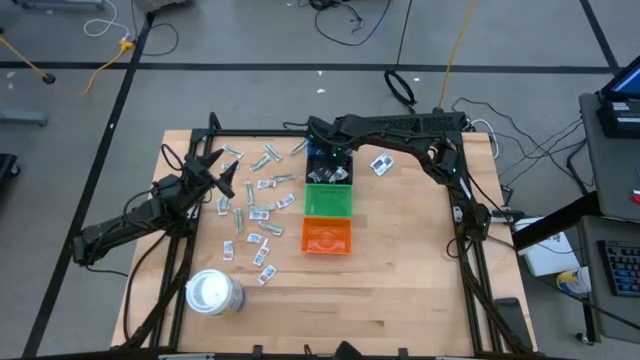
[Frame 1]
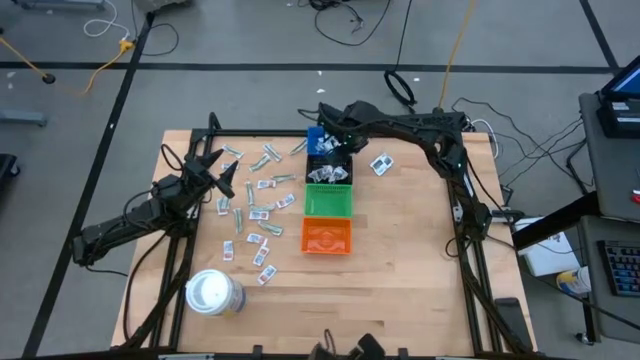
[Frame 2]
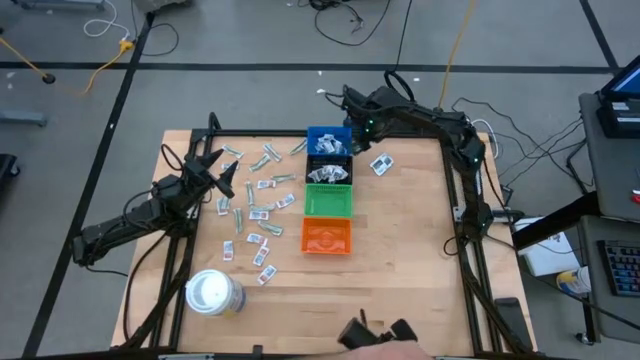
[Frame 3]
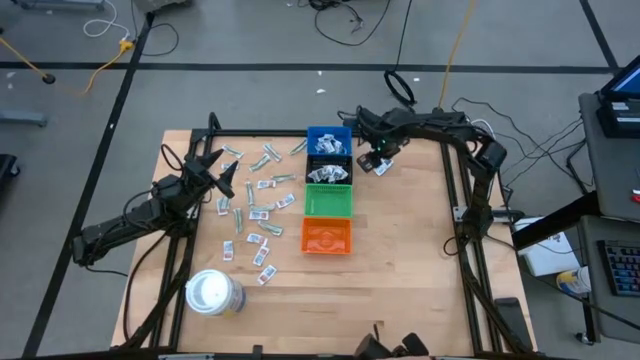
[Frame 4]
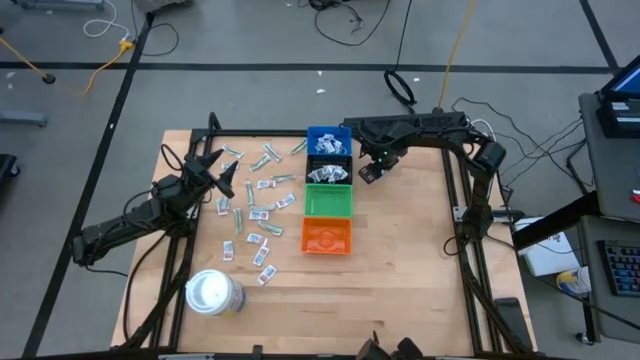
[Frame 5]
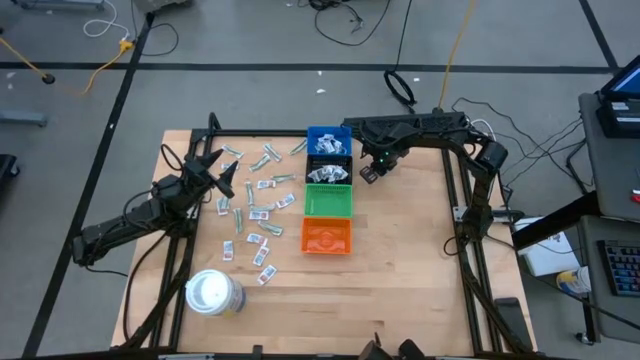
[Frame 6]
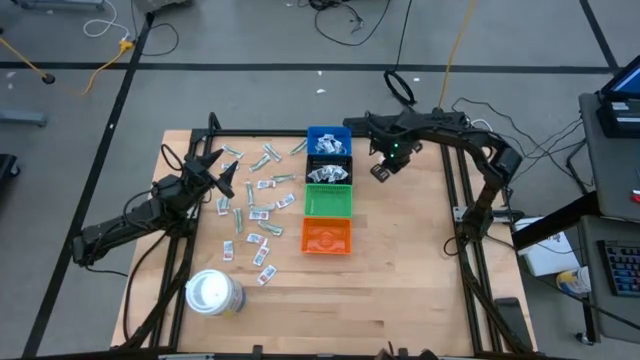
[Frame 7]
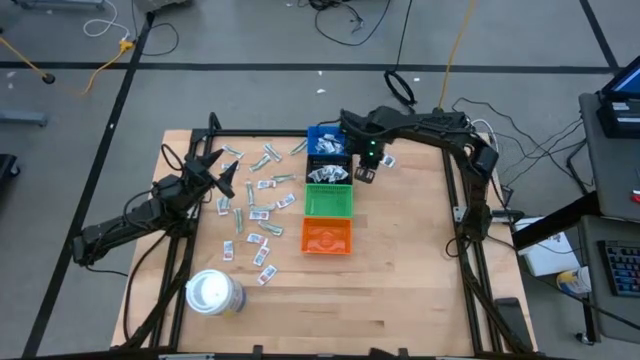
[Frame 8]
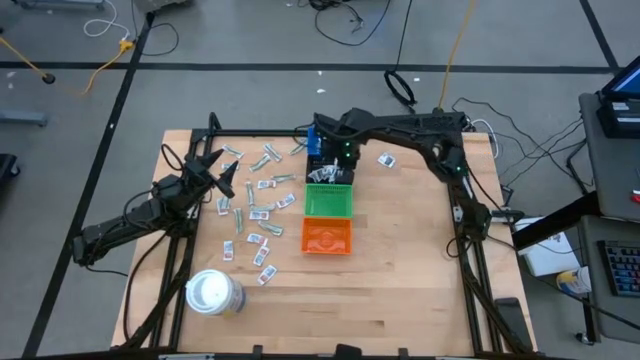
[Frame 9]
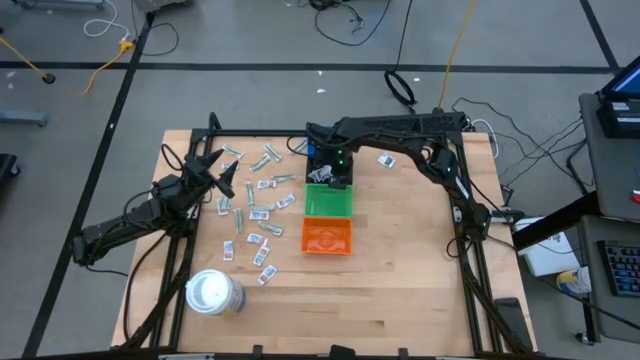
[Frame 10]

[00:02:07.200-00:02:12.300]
Task: Pick & Place First Aid Supplies
Put the black towelette pack into the black bin

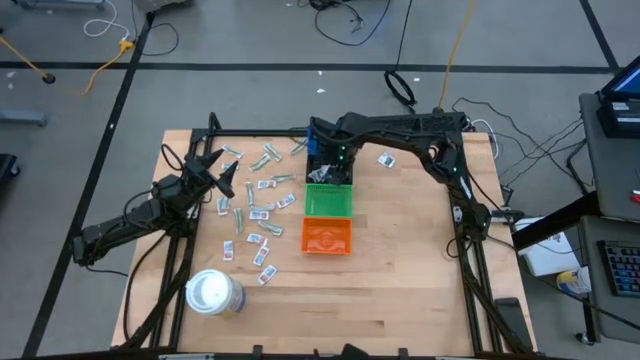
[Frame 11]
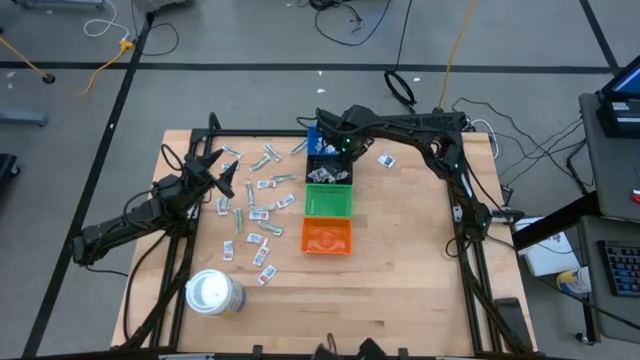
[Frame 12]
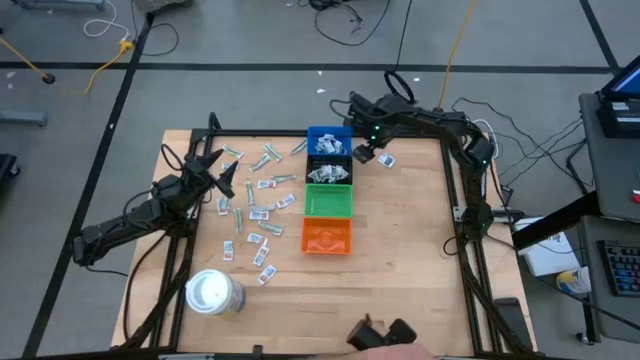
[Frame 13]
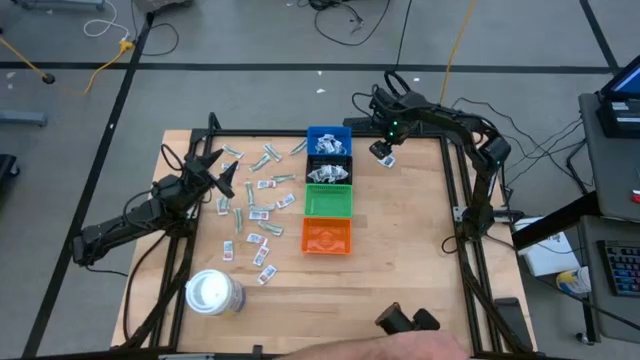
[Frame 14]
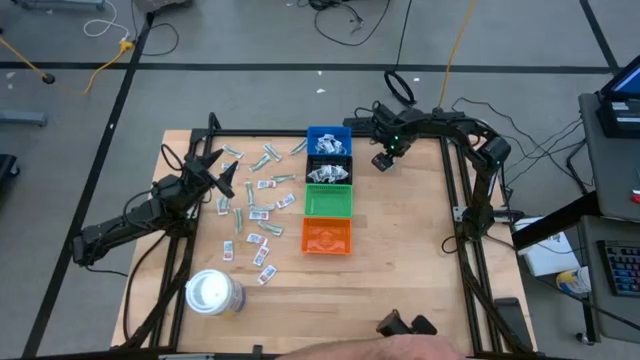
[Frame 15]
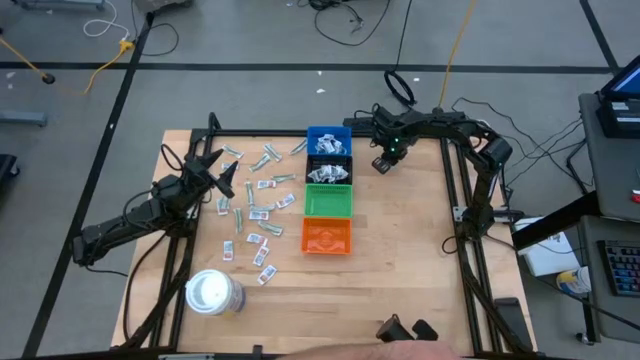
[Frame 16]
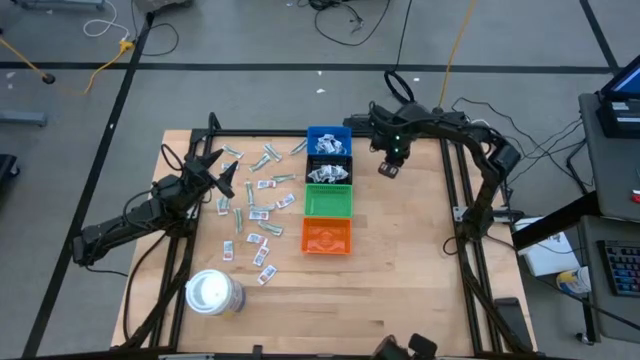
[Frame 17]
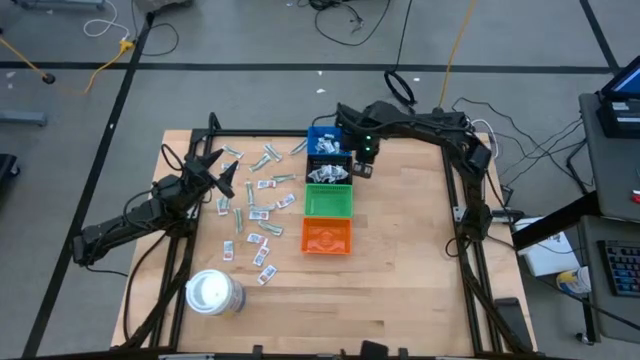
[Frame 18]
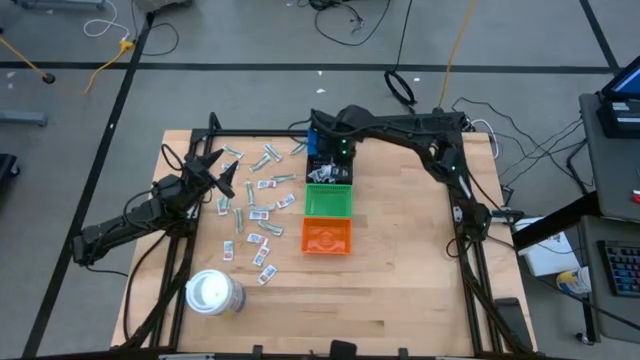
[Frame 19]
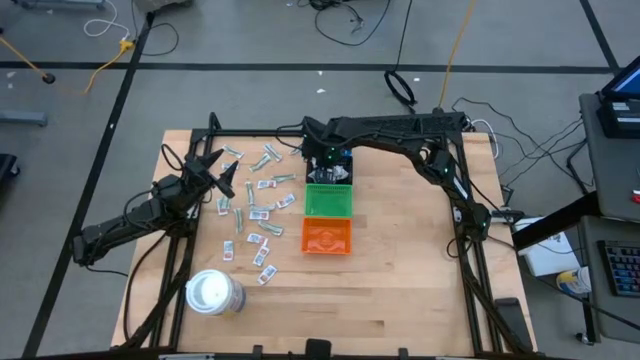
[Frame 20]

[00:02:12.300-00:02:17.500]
Put the black towelette pack into the black bin

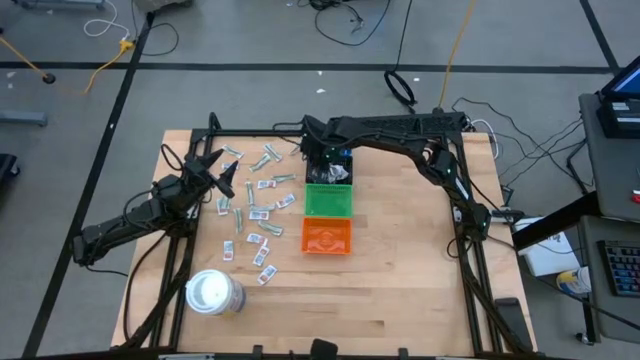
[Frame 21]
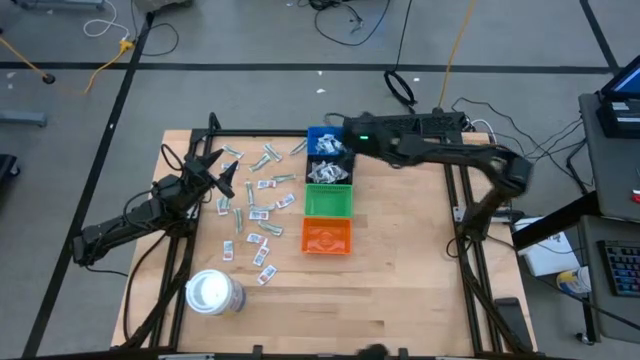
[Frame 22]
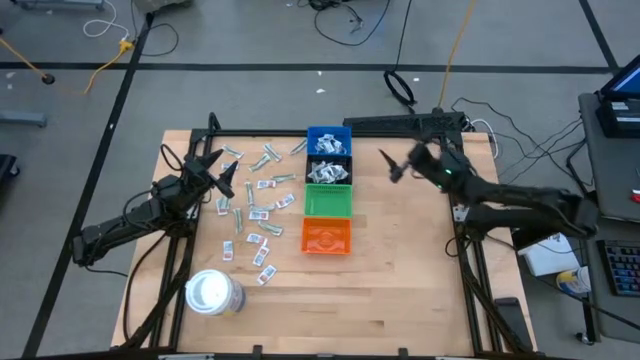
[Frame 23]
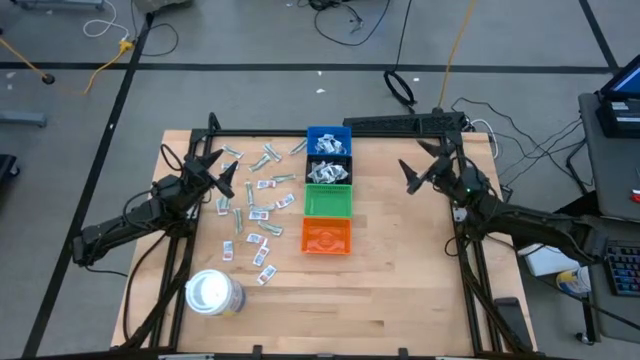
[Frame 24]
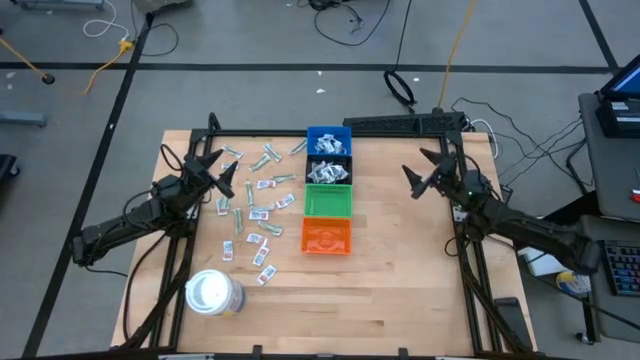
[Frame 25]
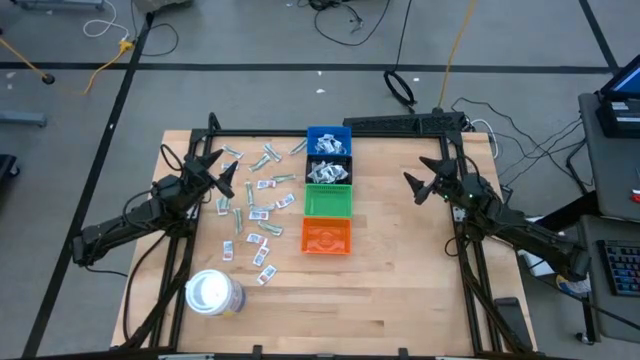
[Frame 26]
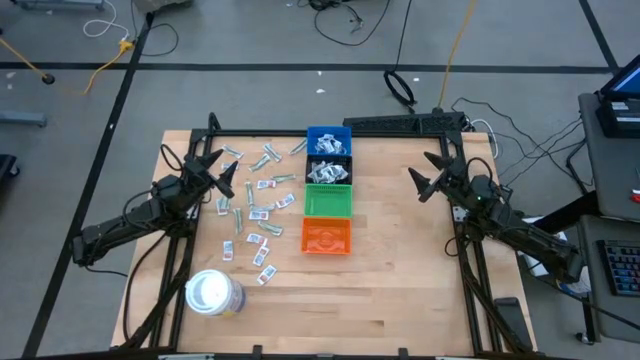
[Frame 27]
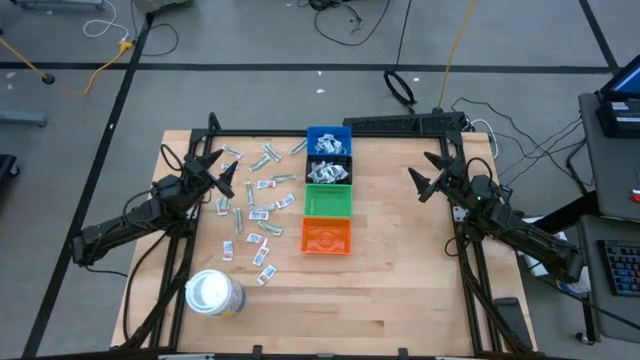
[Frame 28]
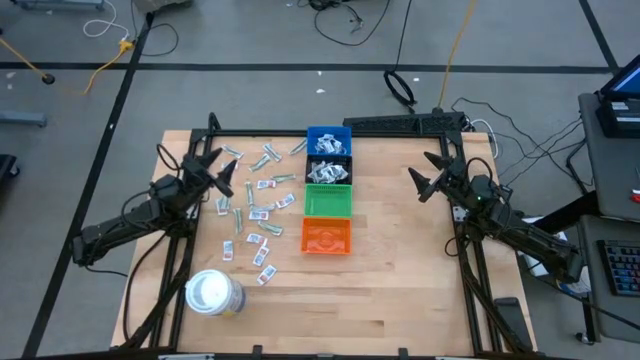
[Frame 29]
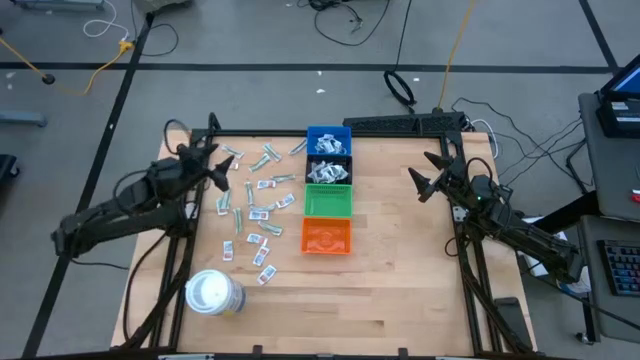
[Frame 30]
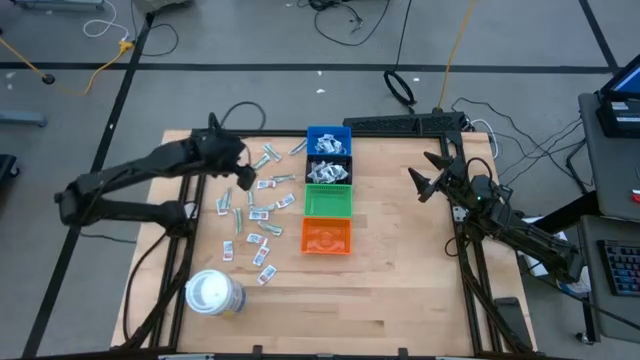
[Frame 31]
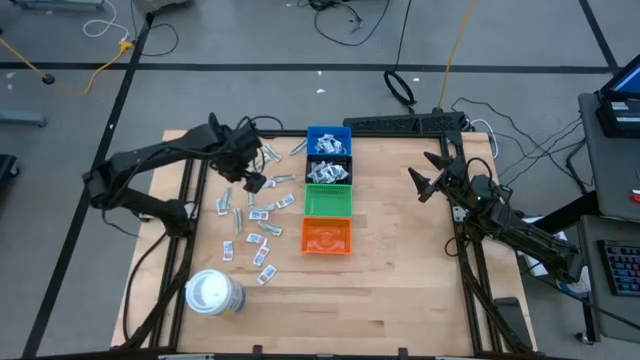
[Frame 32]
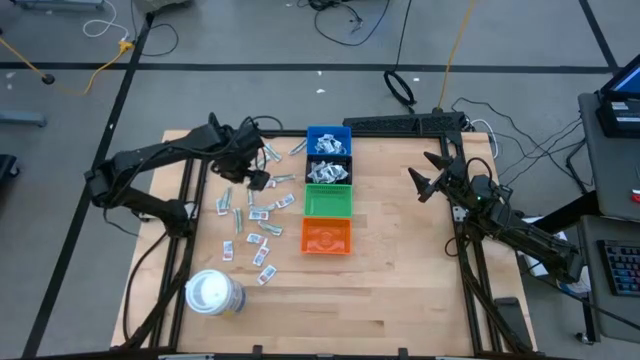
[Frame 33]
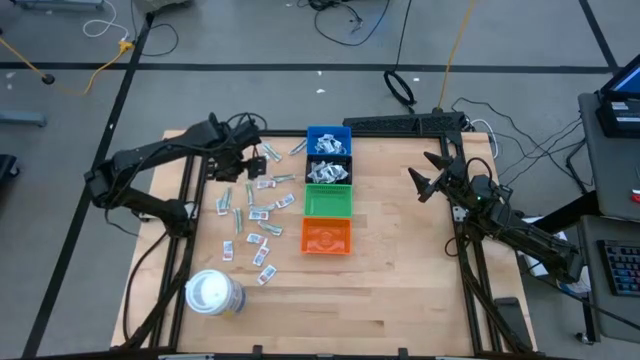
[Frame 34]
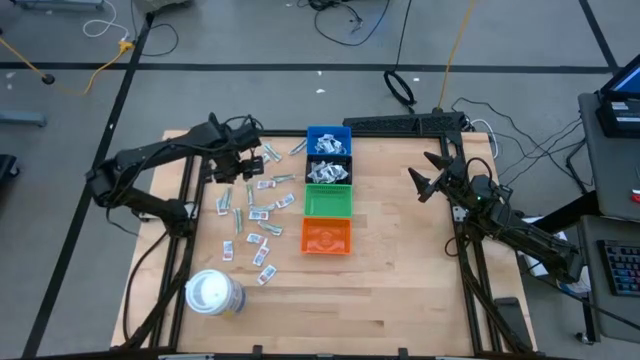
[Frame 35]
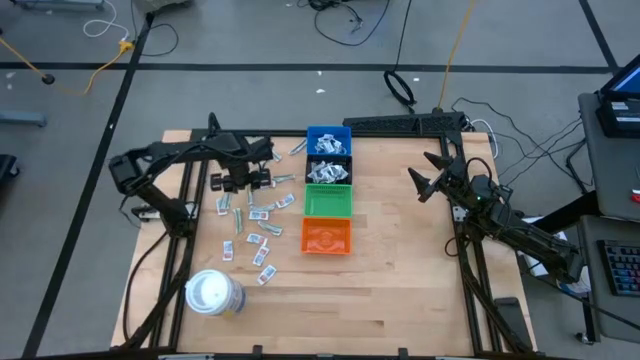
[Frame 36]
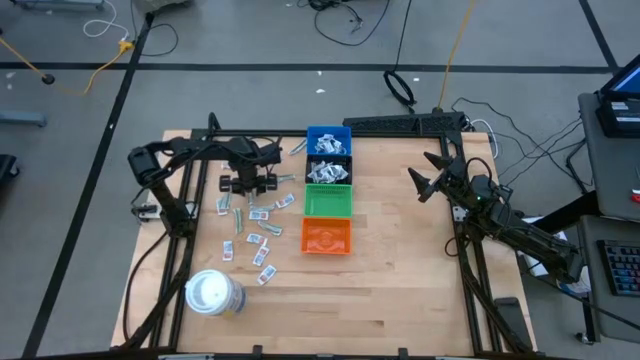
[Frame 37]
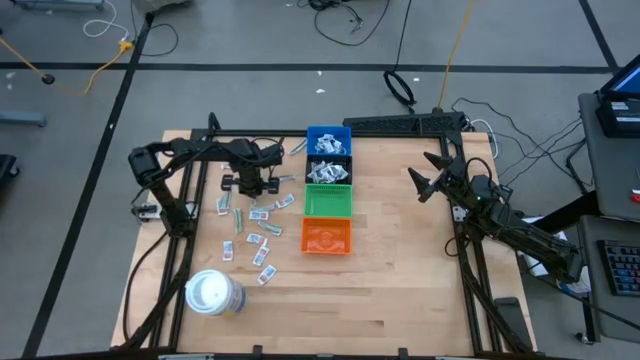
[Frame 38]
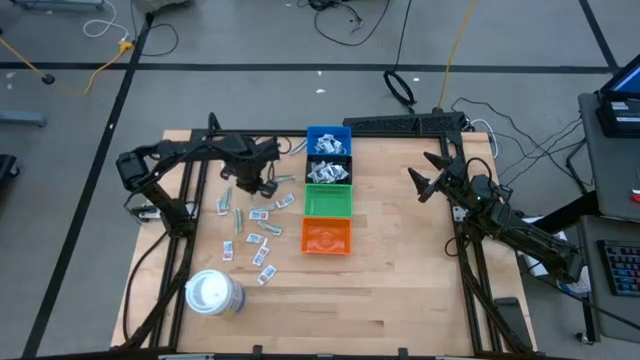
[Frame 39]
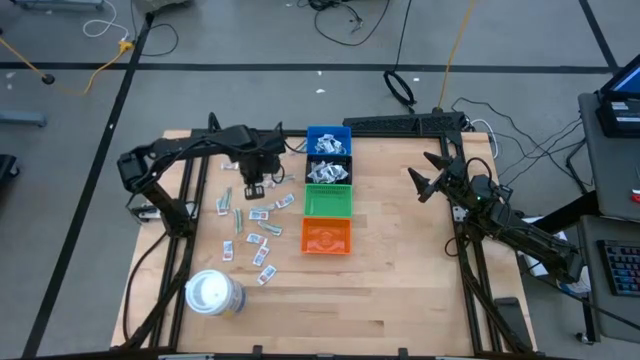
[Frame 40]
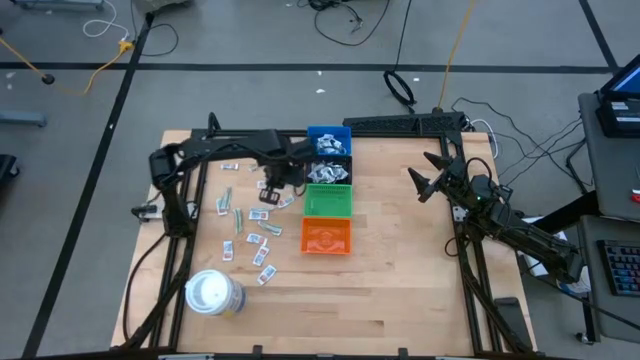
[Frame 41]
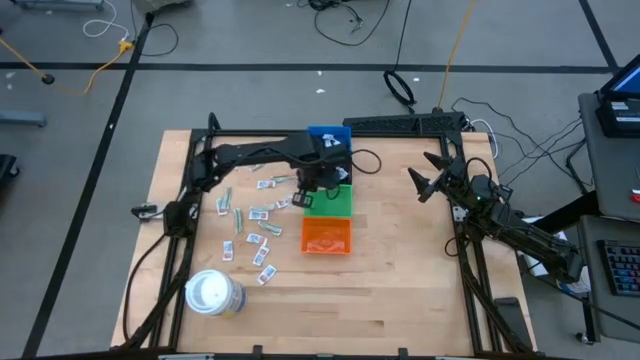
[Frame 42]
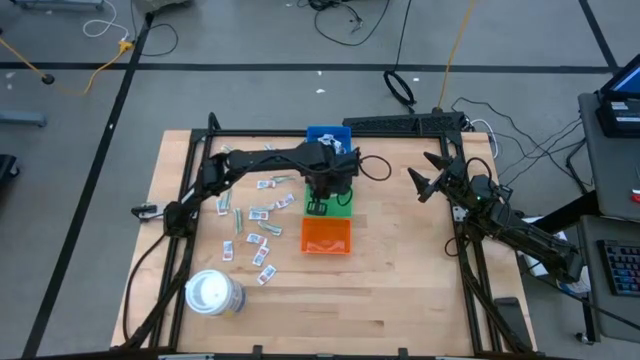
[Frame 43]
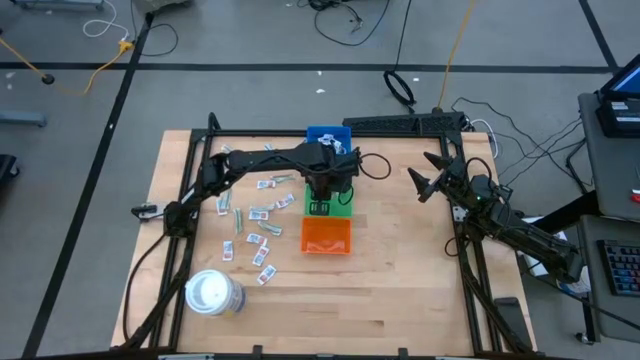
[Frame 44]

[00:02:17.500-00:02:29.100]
Put the green bandage into the green bin
